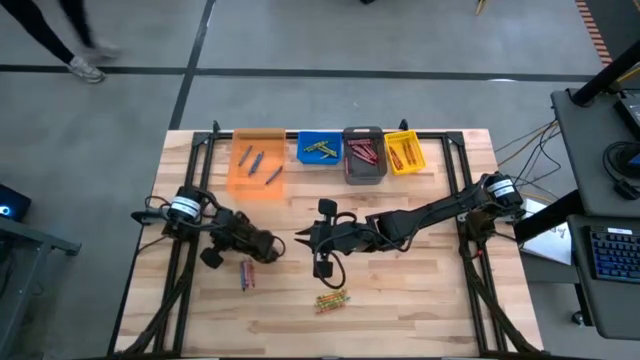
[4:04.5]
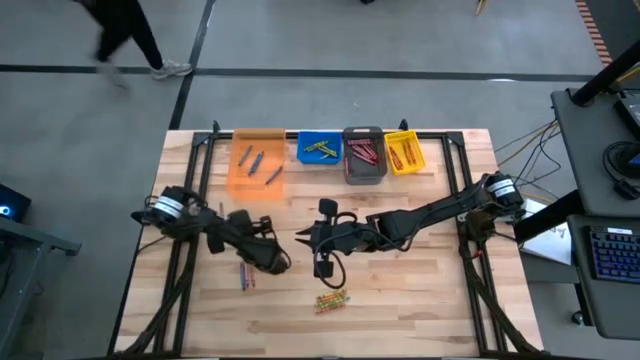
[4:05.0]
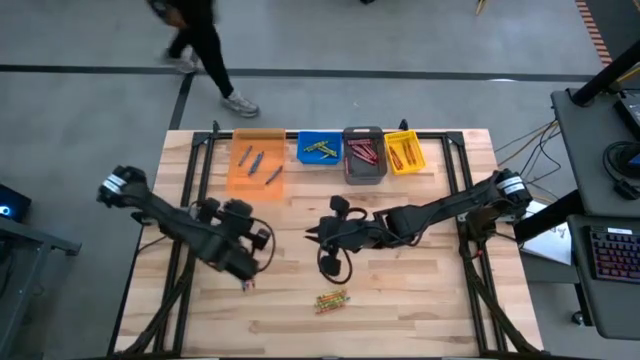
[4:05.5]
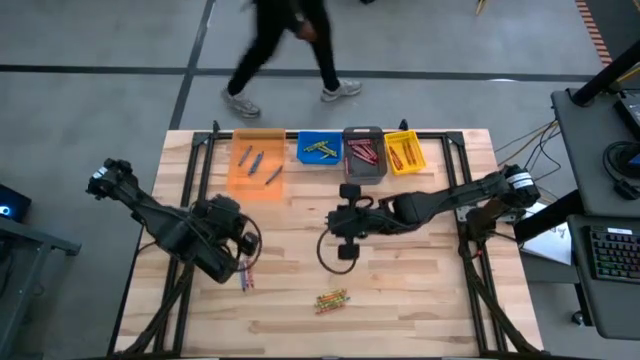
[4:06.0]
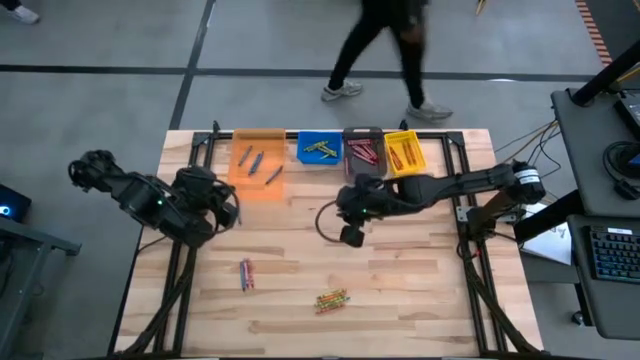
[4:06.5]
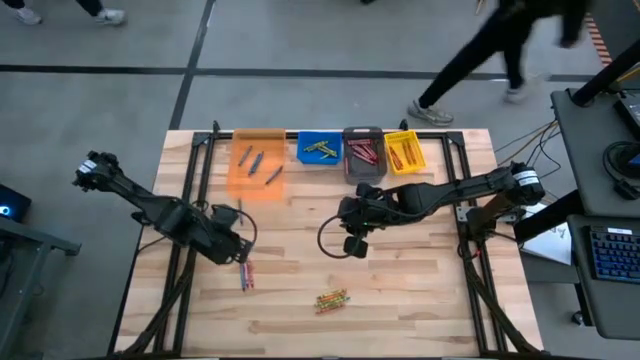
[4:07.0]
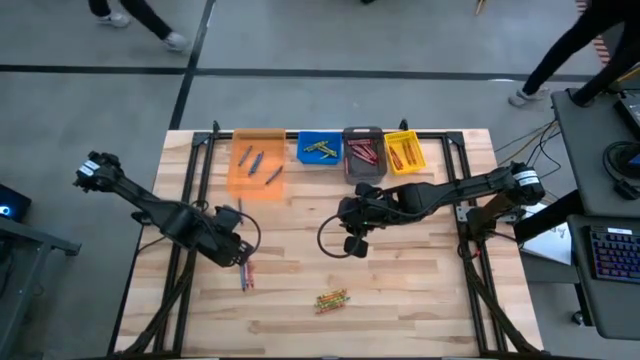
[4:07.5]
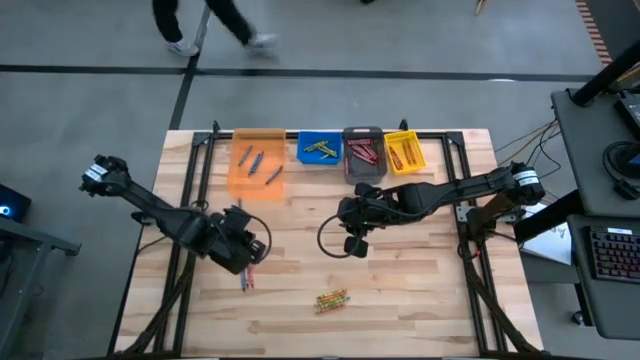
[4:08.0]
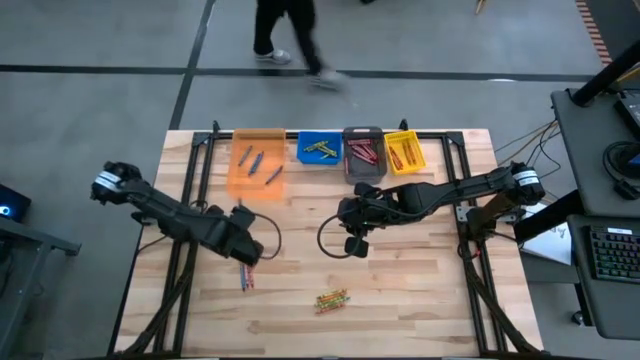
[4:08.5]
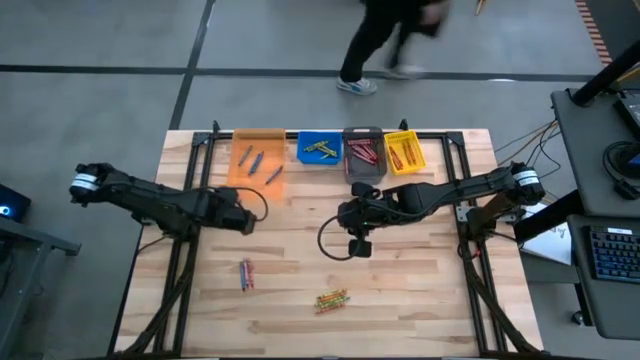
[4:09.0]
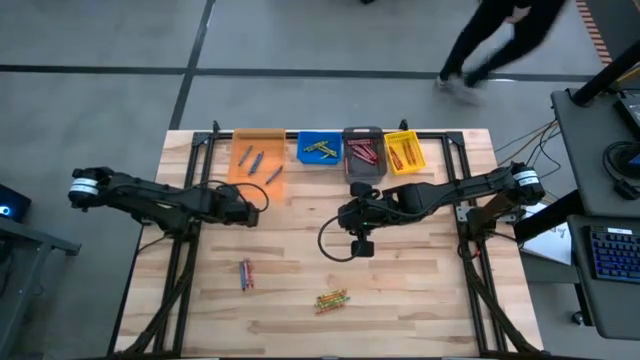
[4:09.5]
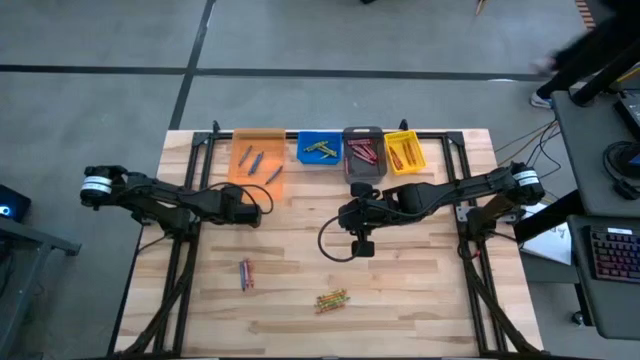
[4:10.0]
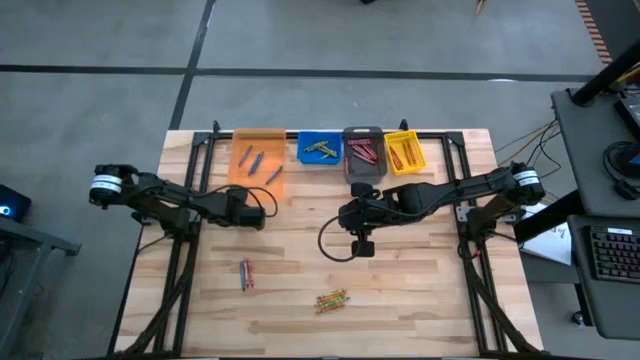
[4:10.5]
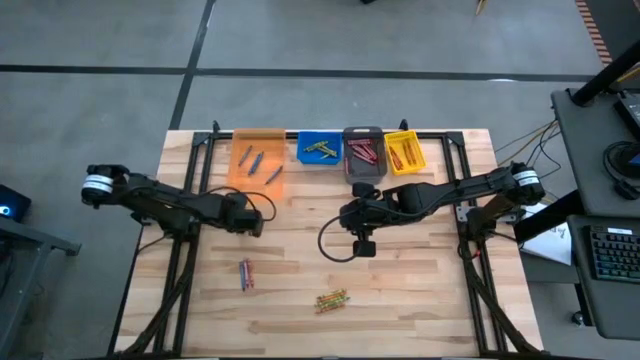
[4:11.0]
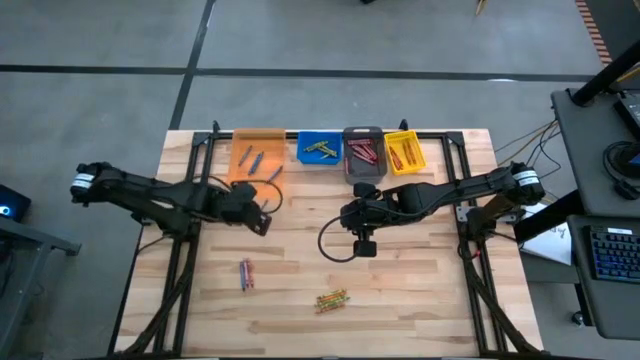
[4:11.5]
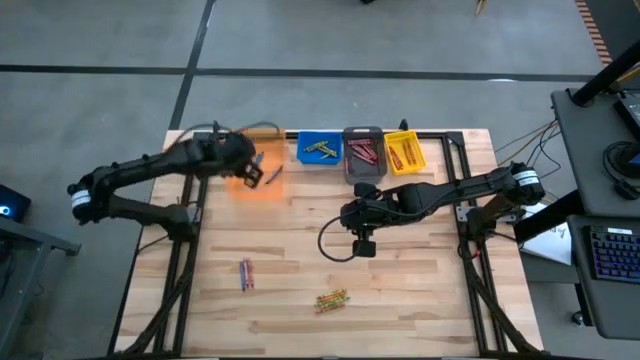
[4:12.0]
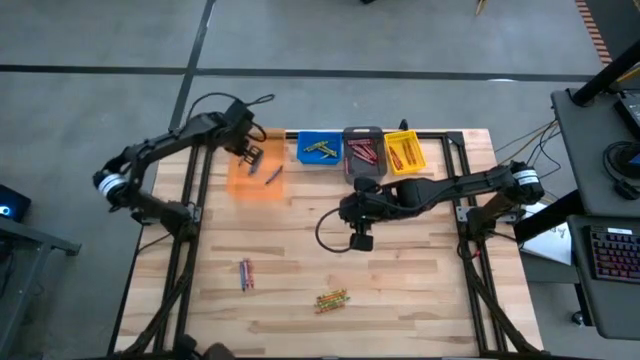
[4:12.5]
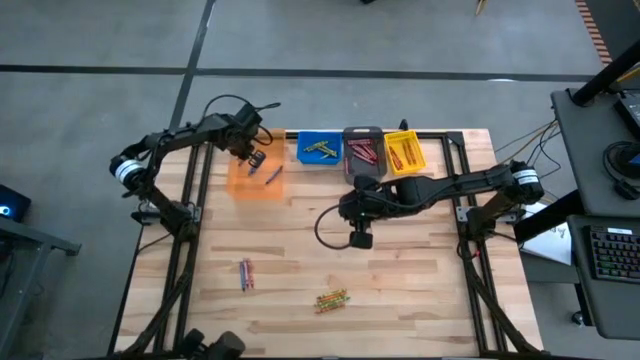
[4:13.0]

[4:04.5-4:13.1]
Task: Sort crayons
Put the blue crayon into the orange bin

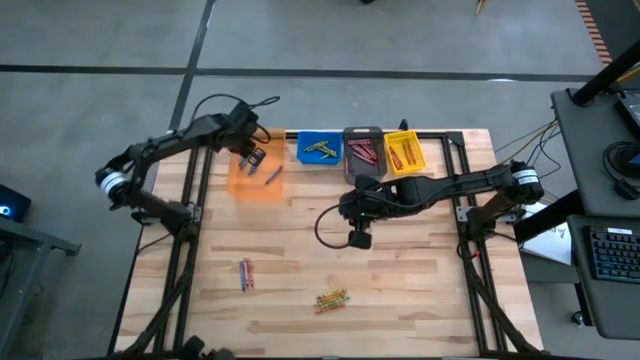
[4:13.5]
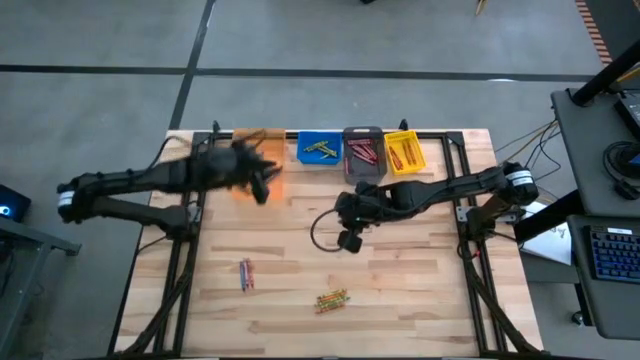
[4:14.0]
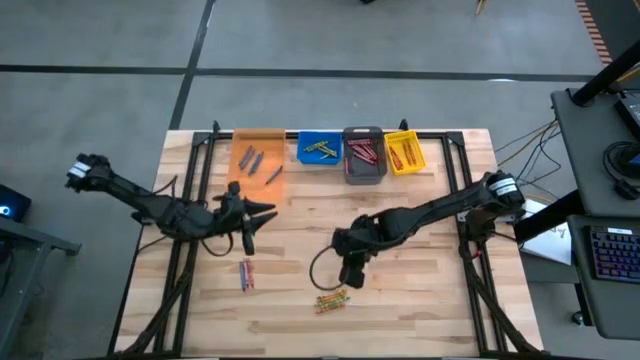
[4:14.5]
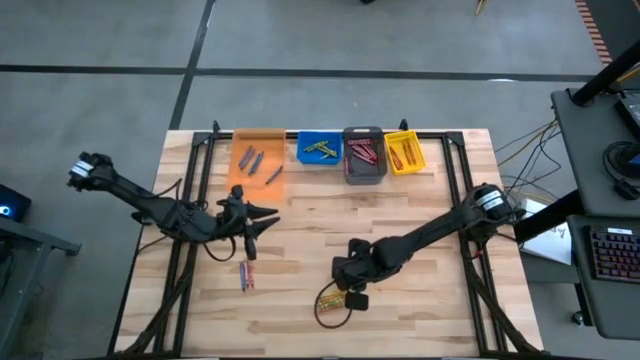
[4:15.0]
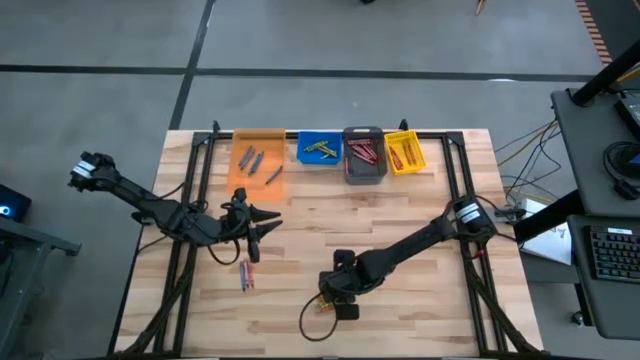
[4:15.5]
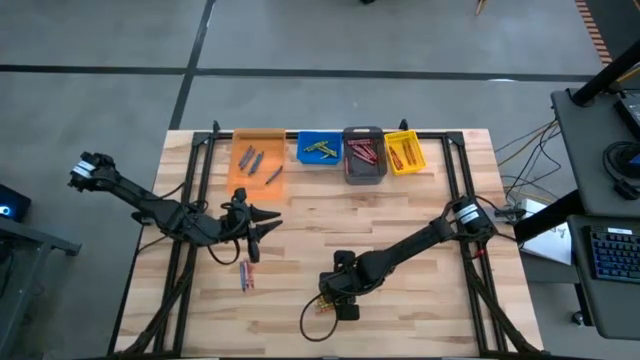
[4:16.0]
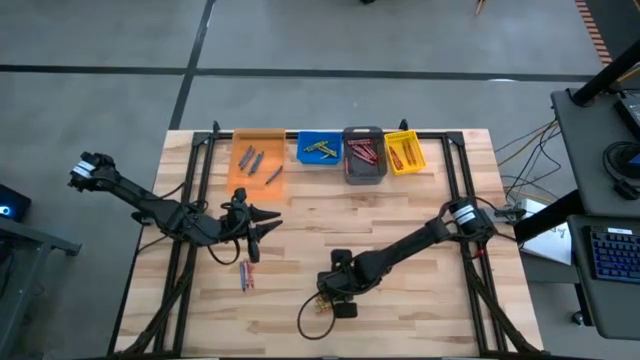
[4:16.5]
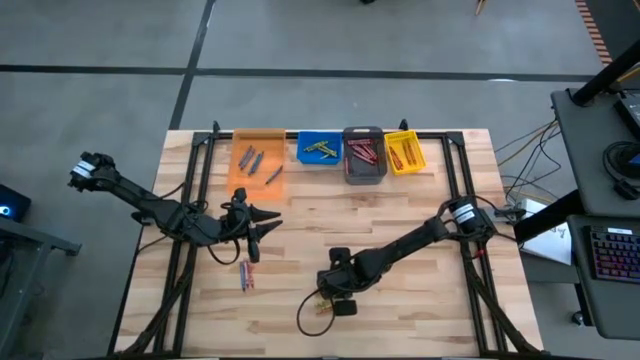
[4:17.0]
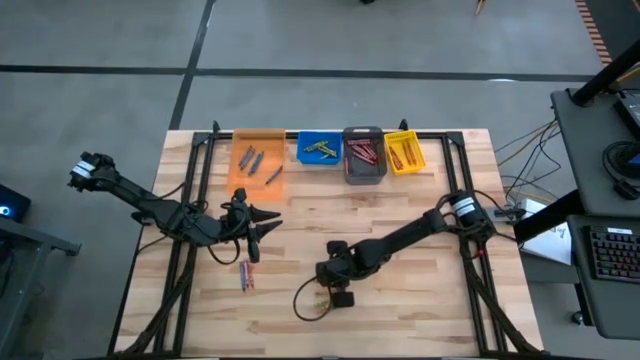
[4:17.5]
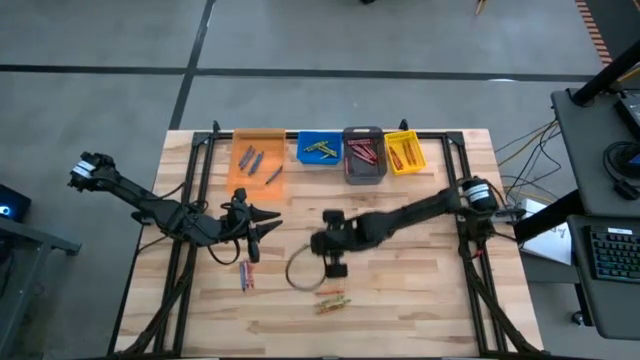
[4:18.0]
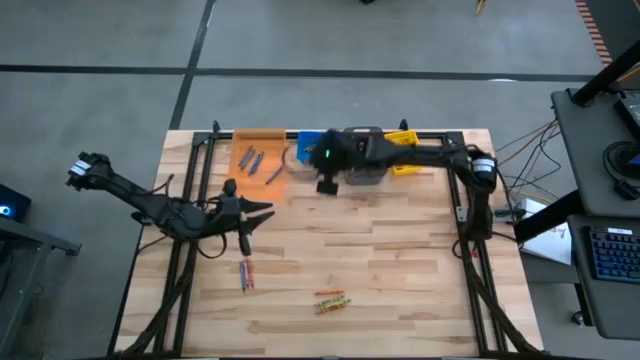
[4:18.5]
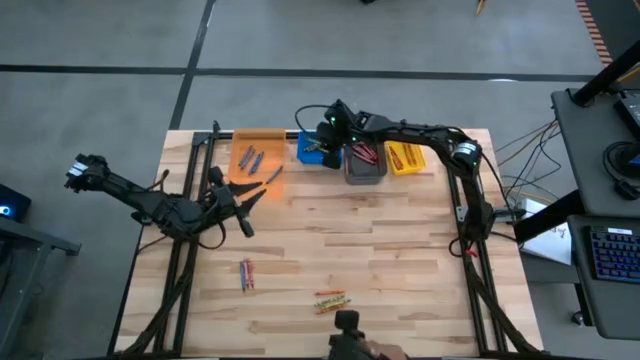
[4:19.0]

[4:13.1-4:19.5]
Put the green crayon into the blue bin

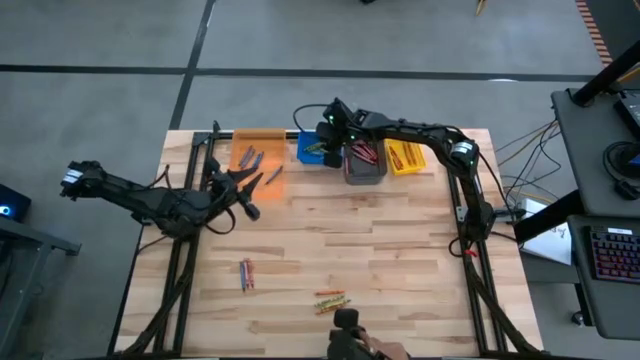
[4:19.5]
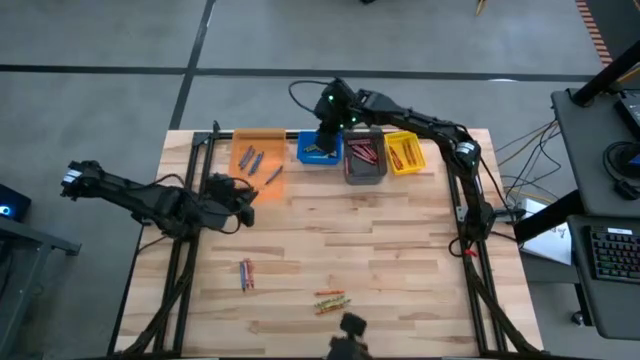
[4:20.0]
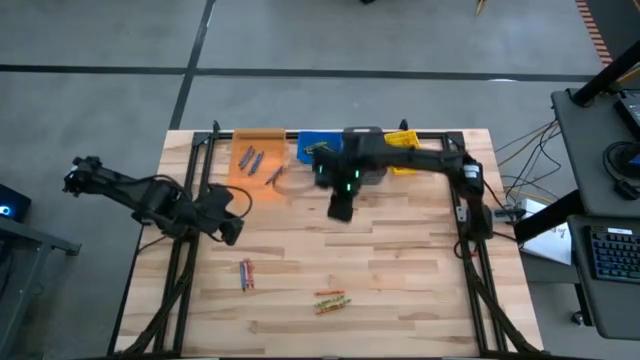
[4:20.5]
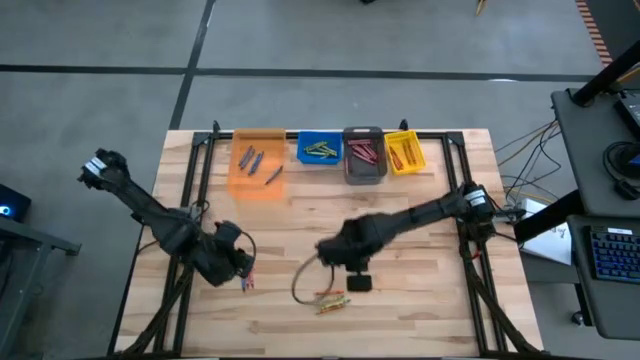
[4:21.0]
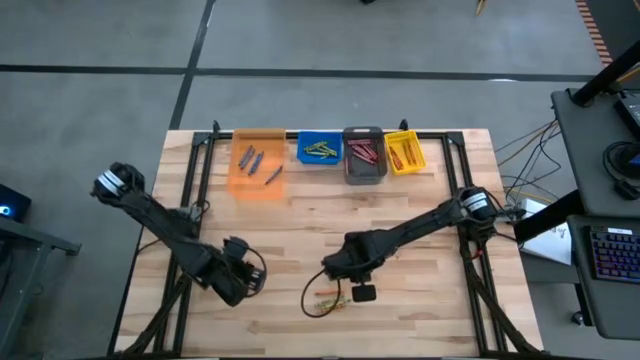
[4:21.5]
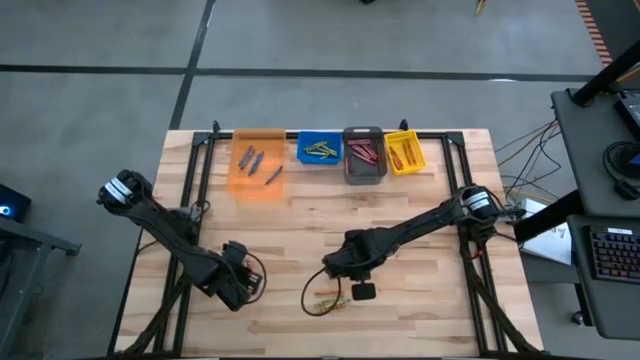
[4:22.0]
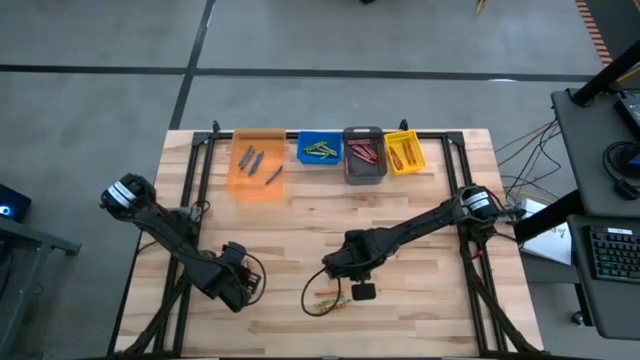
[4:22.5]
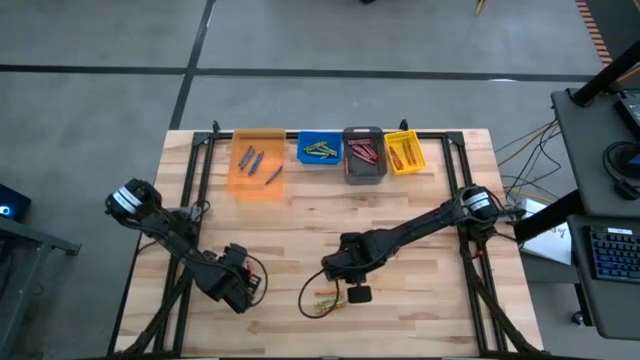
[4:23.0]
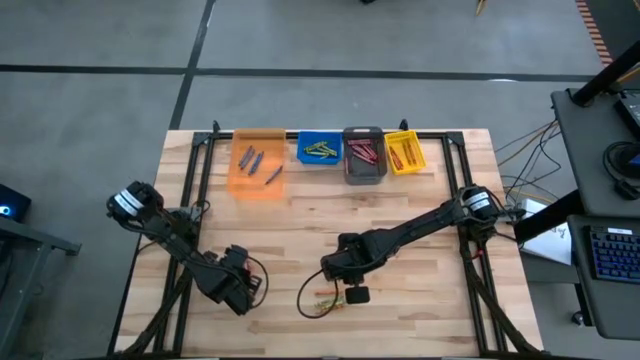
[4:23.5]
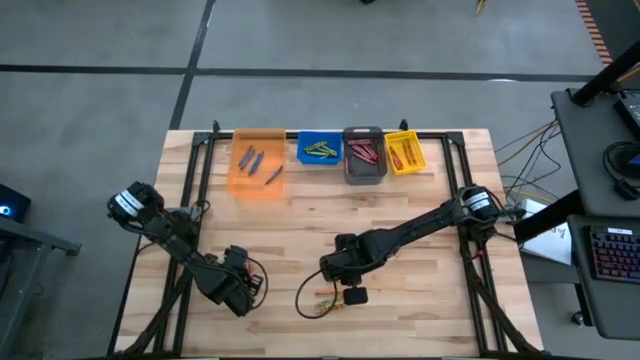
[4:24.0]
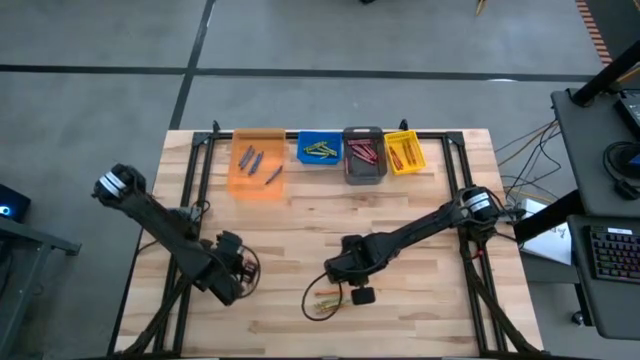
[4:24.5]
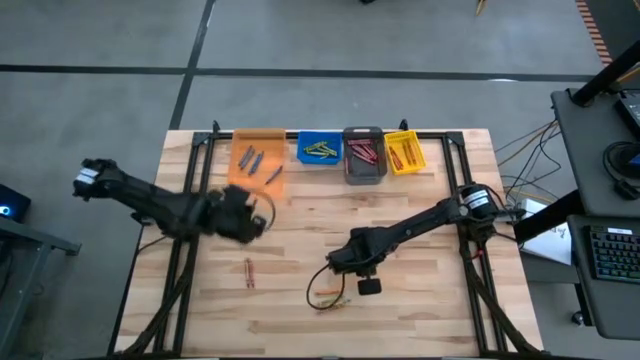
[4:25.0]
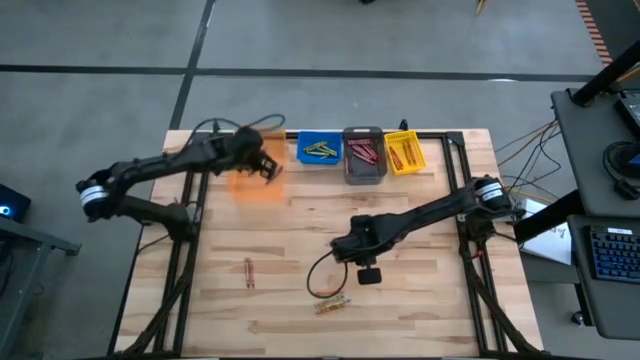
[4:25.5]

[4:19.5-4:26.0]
Put the blue crayon into the orange bin

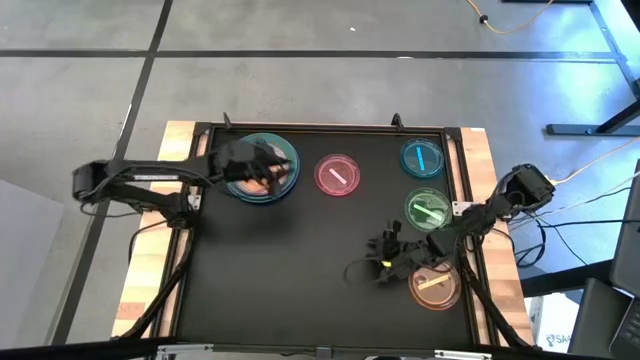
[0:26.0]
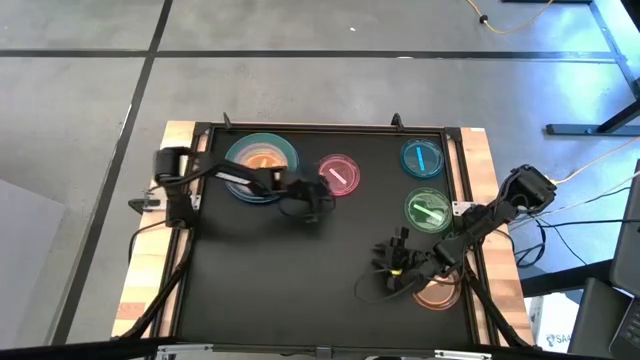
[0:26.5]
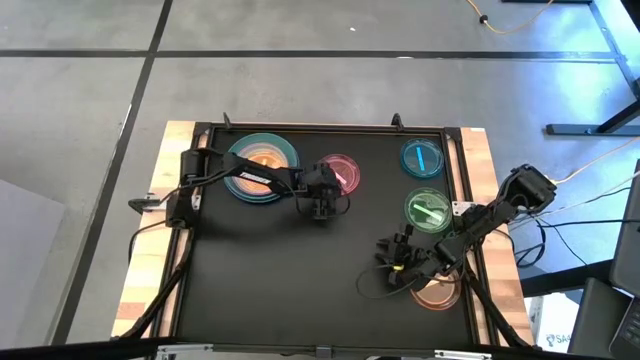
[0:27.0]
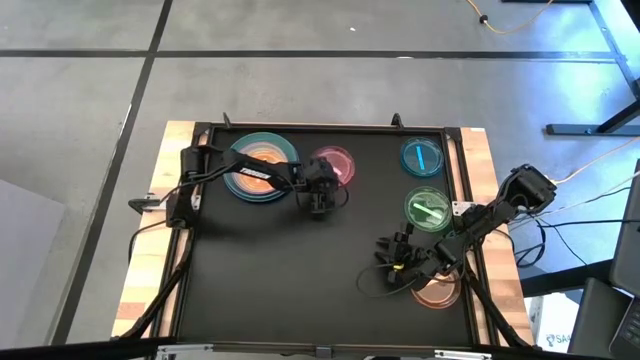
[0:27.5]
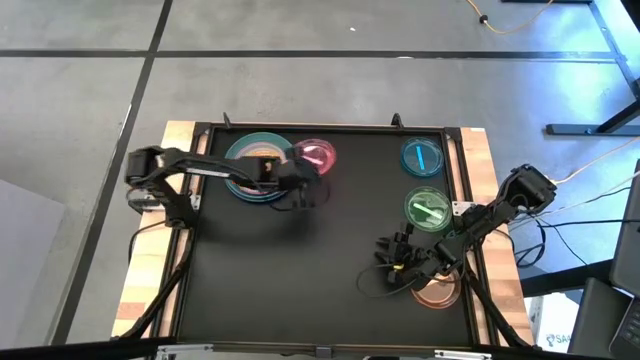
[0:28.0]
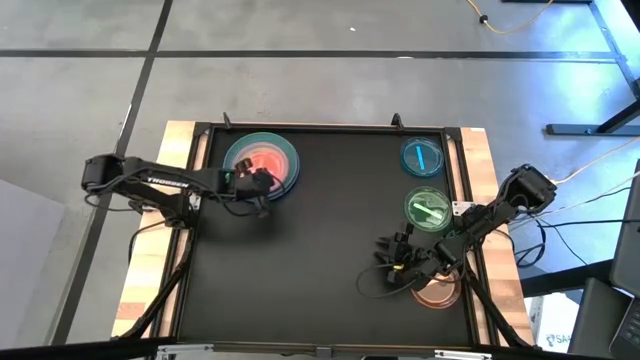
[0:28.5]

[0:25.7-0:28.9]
Task: Stack plastic plates
Stack the pink transparent plate on top of the orange transparent plate
